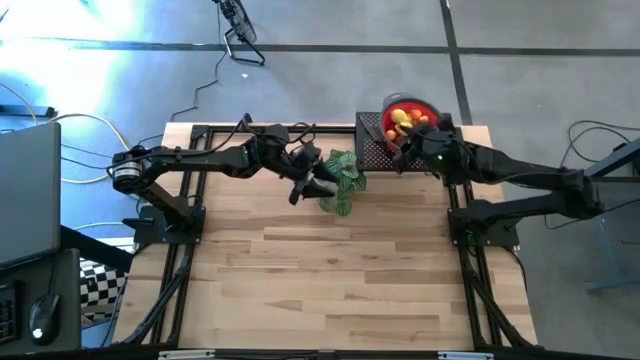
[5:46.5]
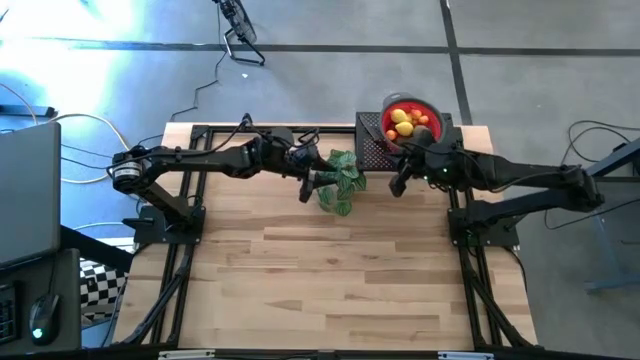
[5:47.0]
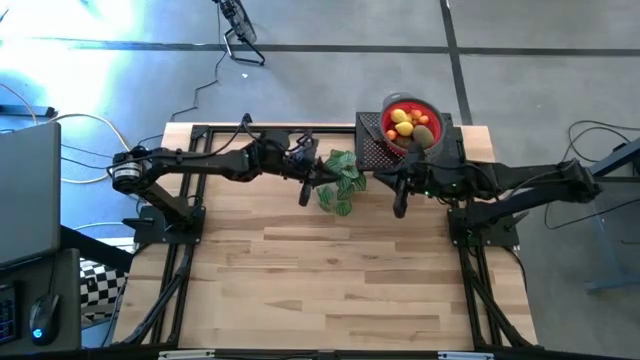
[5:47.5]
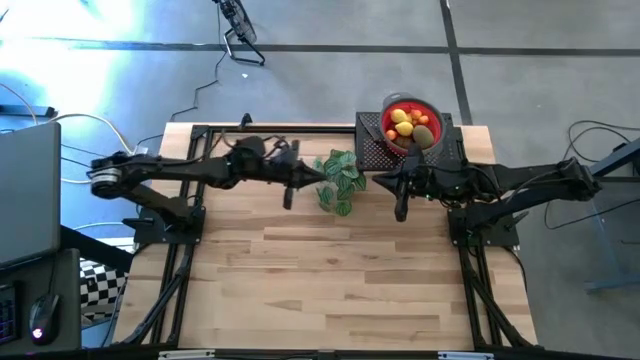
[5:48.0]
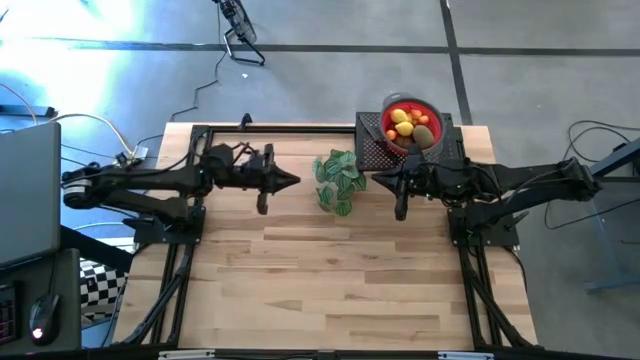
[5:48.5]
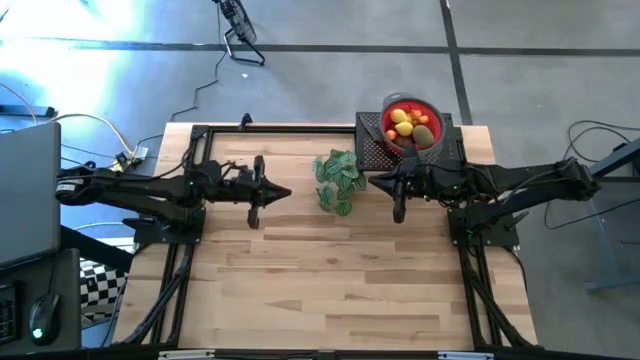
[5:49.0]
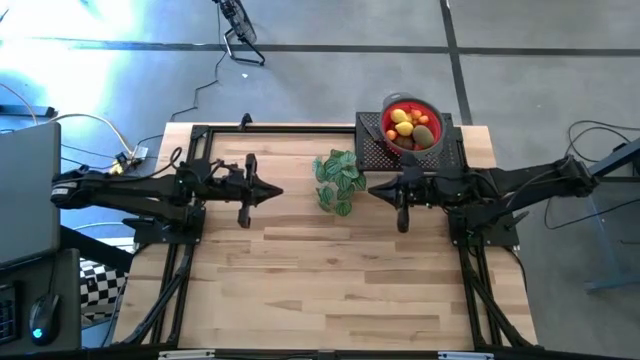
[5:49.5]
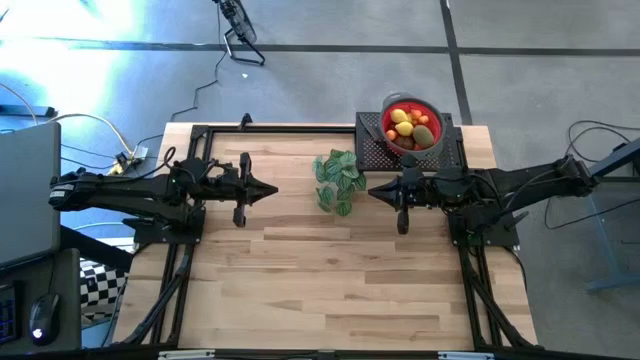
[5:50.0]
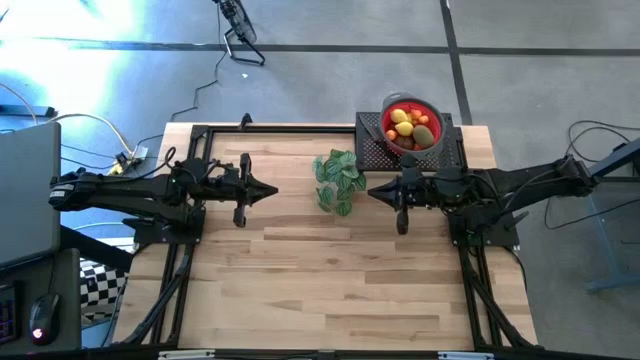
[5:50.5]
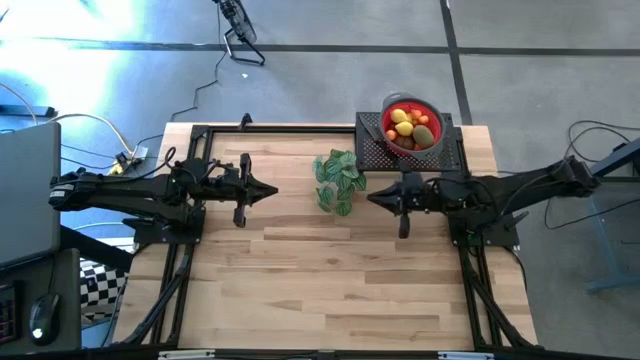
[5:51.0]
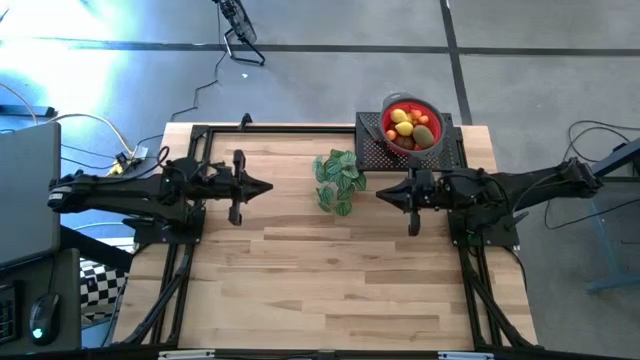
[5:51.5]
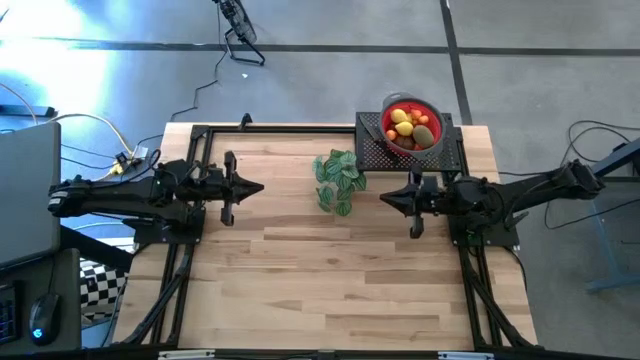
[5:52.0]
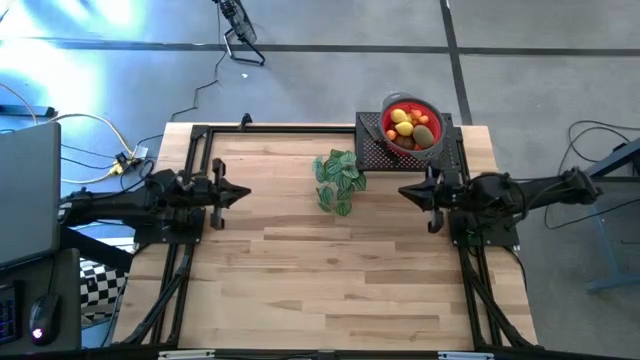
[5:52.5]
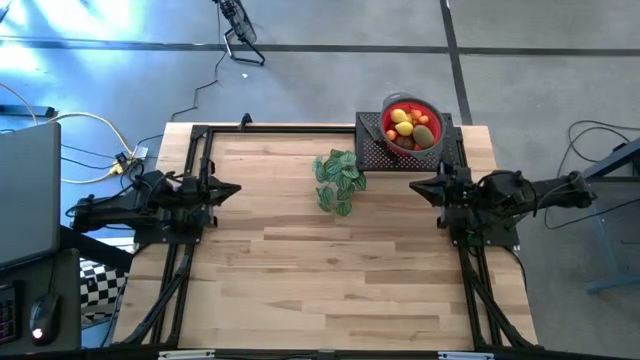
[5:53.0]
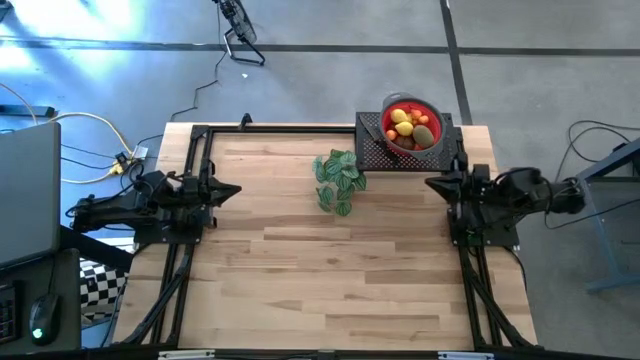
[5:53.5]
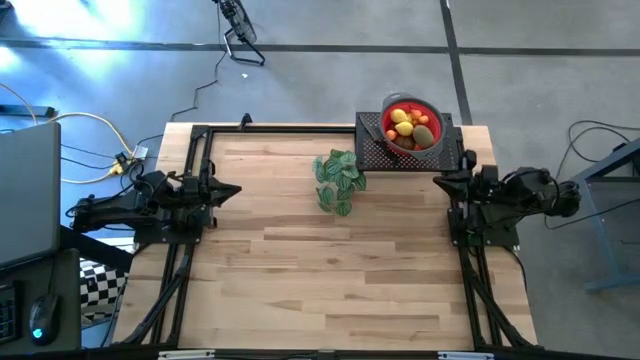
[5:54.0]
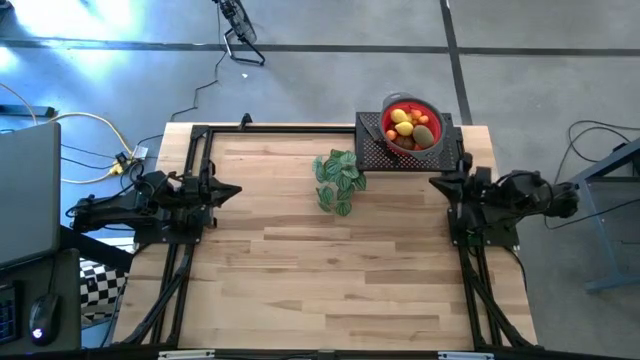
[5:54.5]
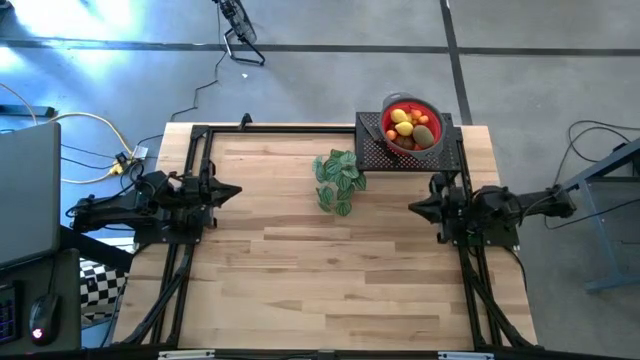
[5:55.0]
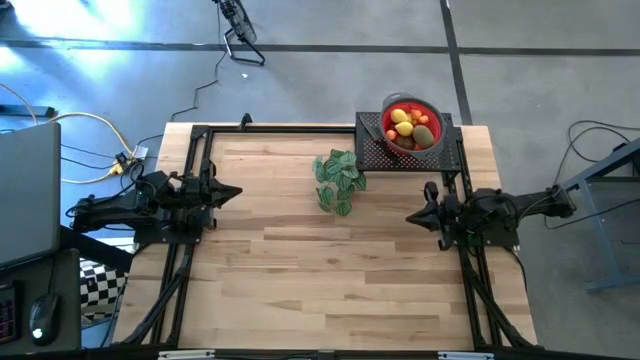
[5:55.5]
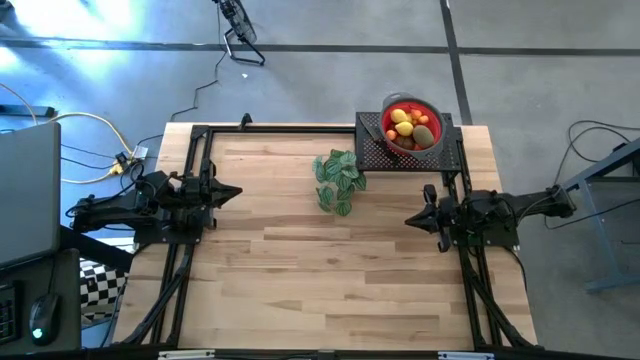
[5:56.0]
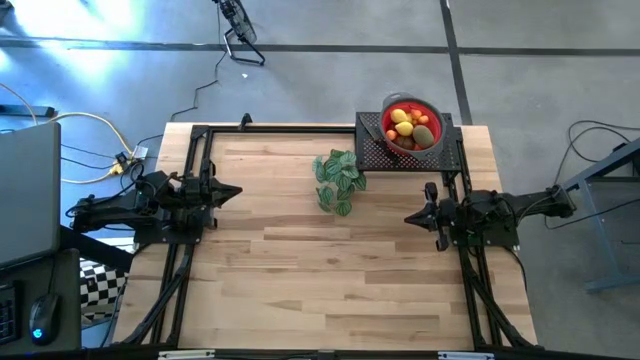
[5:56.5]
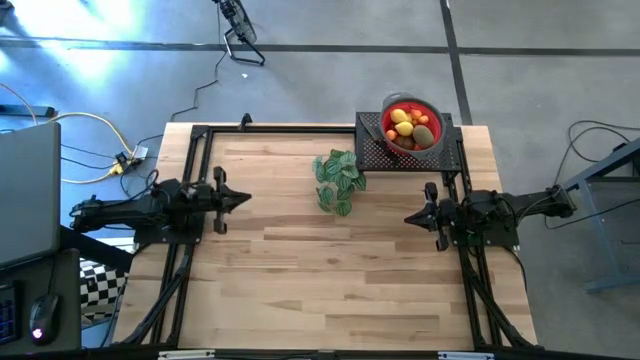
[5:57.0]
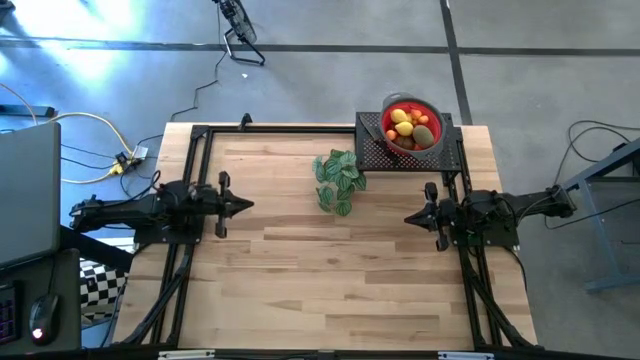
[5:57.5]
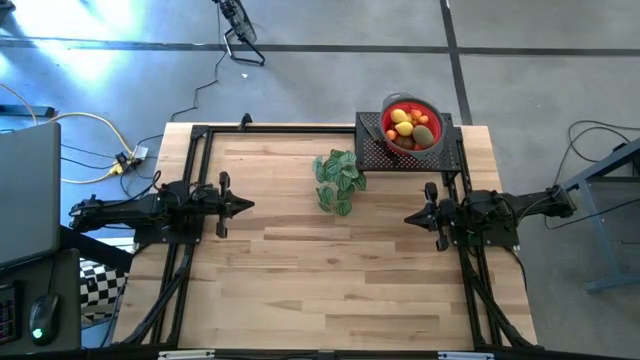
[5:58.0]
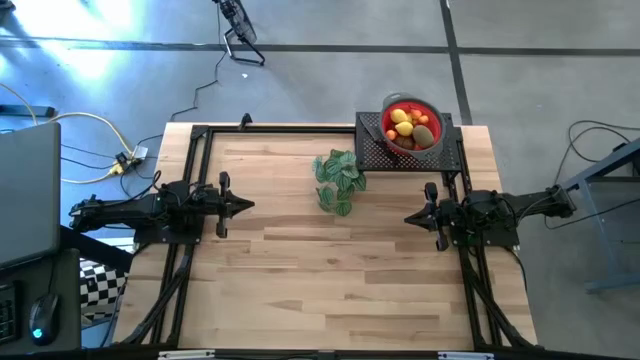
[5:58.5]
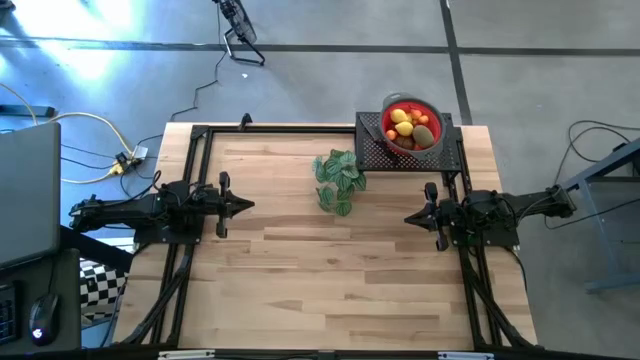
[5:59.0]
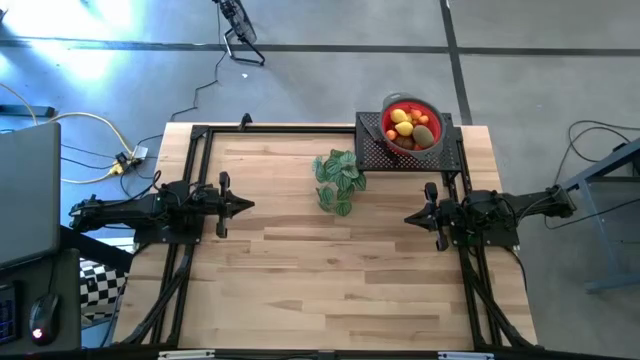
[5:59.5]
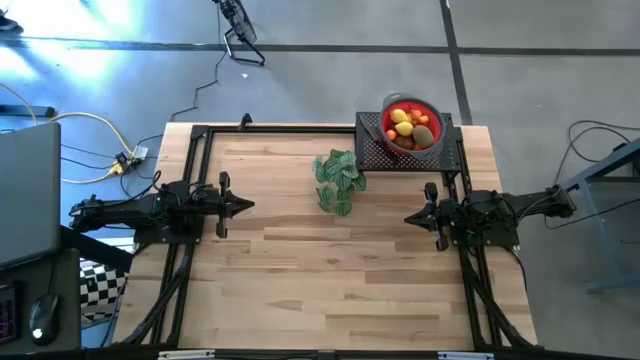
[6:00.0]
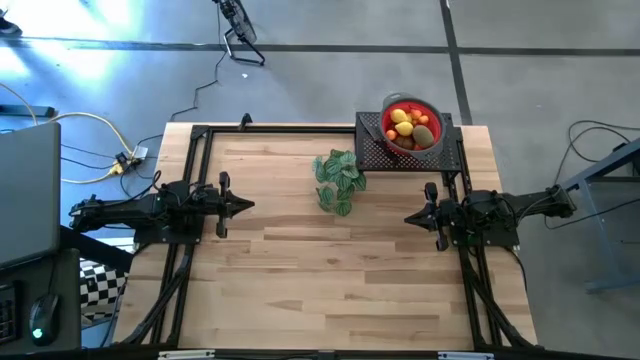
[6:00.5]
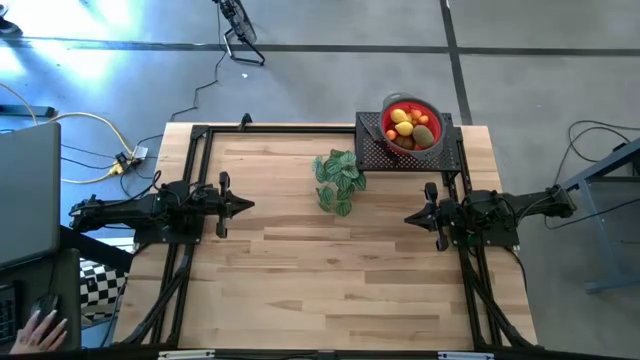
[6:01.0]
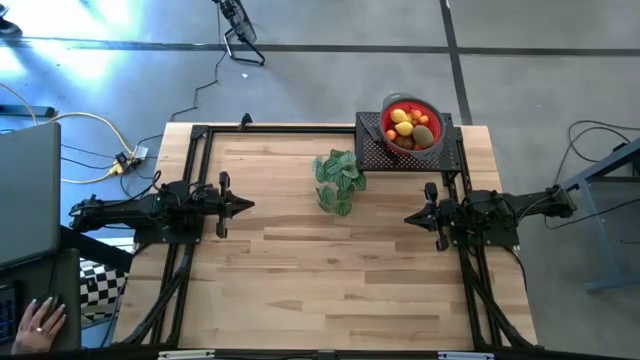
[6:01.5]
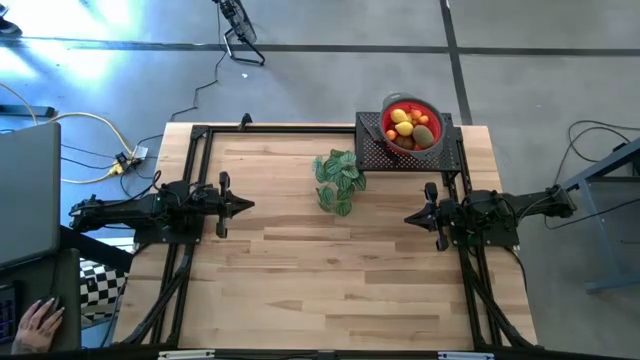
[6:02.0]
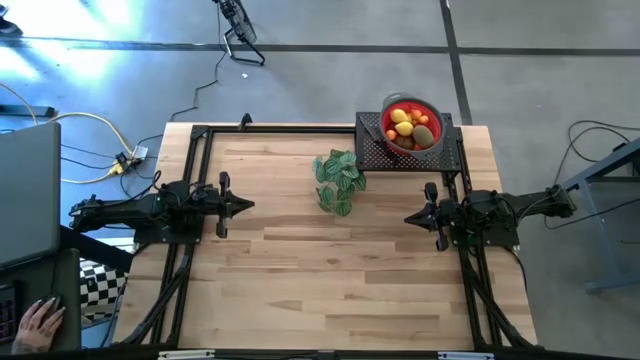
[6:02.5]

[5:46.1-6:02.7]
Task: Pick & Place Fruit
Return to Home Position

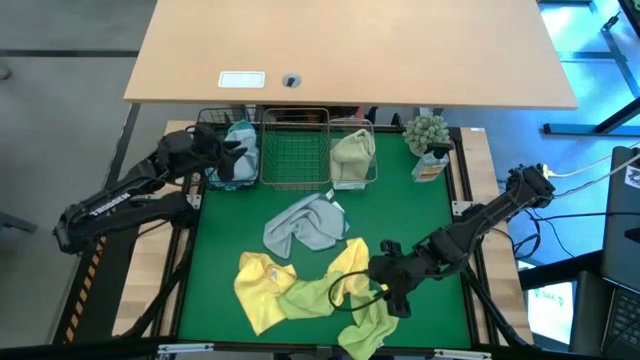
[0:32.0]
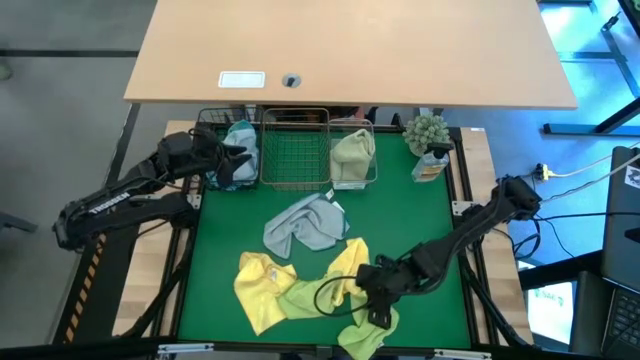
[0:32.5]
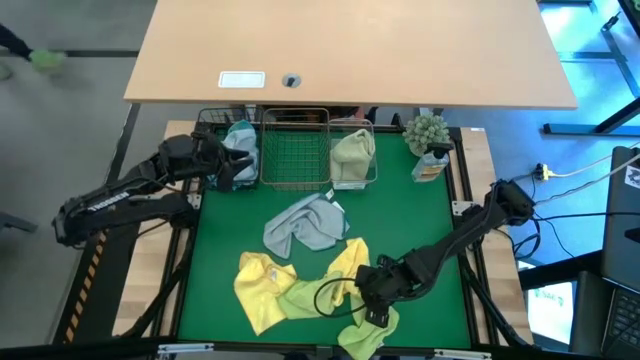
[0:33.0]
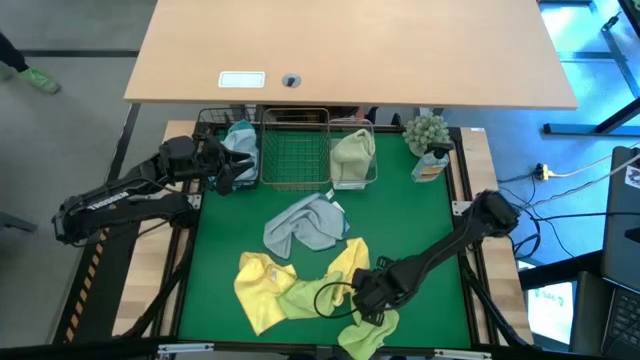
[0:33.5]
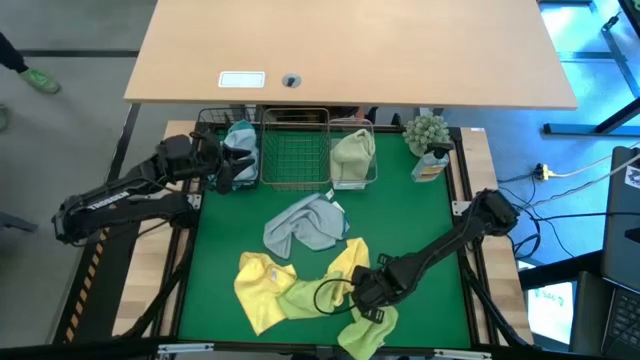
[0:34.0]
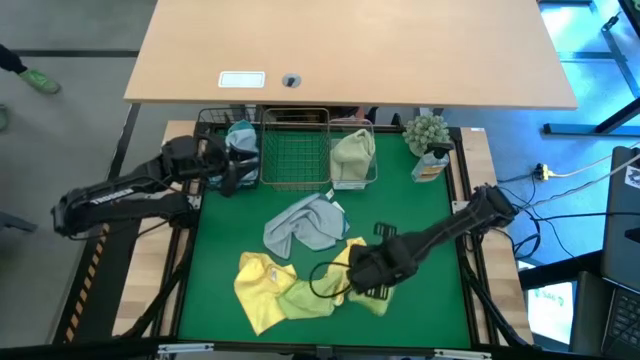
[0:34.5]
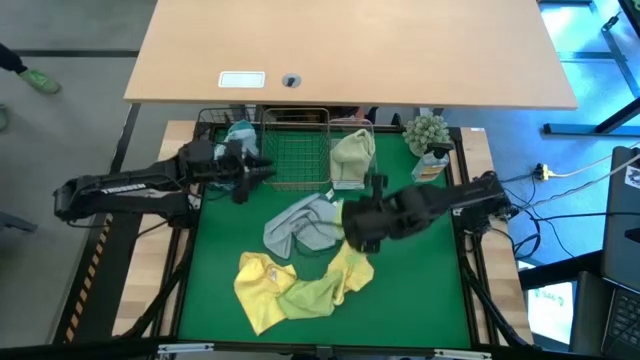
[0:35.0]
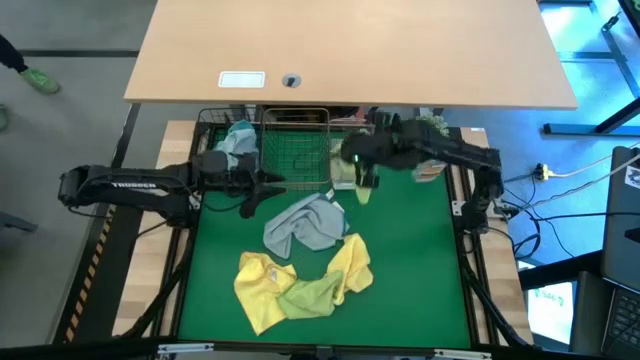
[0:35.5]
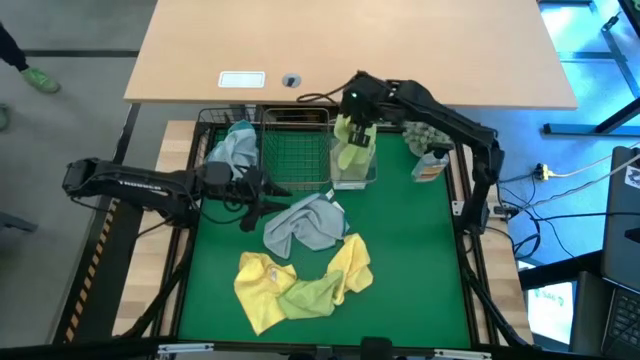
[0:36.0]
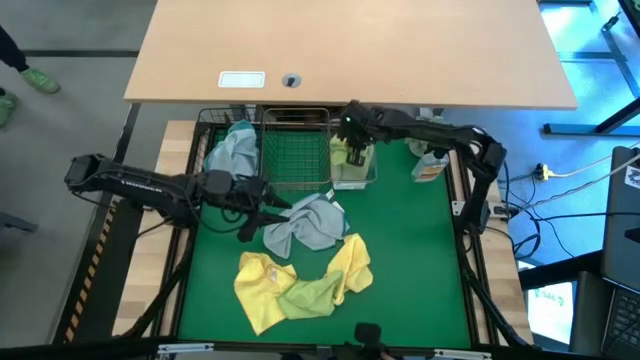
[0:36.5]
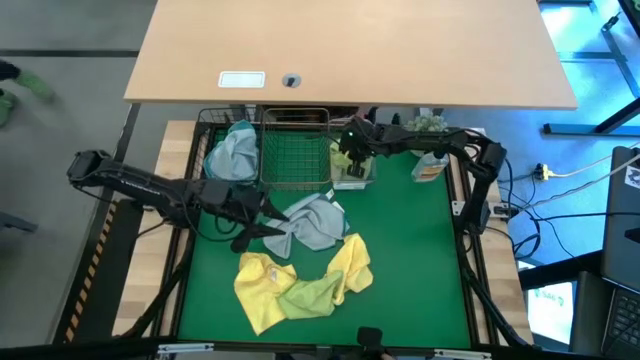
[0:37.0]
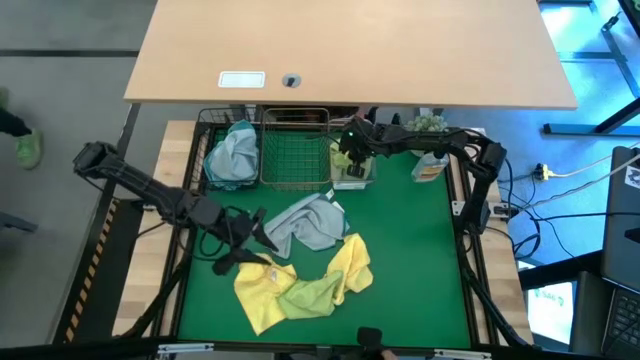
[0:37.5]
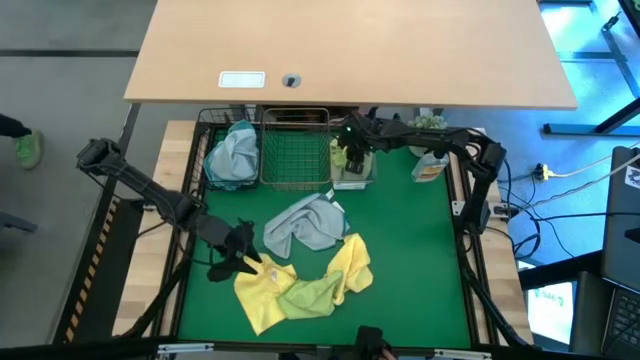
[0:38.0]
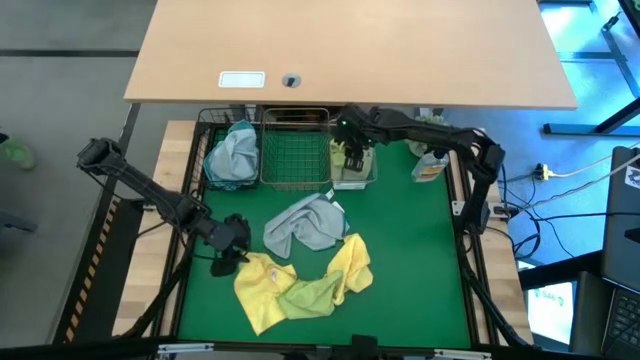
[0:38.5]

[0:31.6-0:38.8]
Task: Sort microfiber towel by color & place in baskets
Put the green microfiber cloth into the transparent bin
